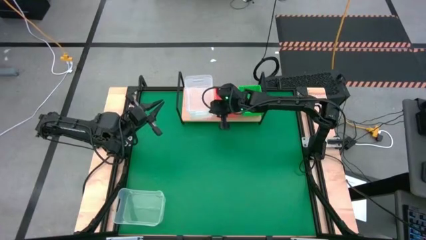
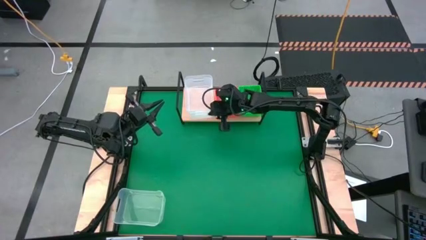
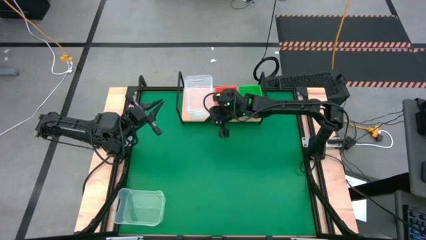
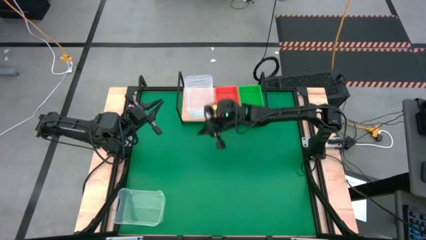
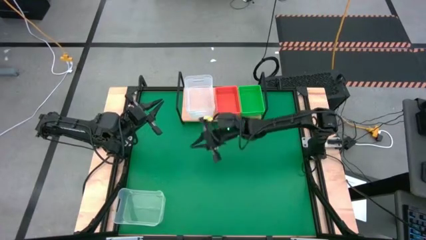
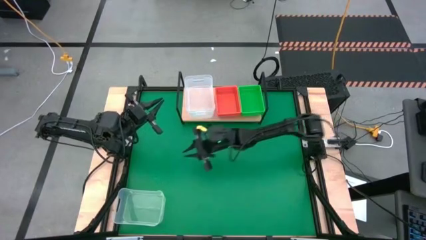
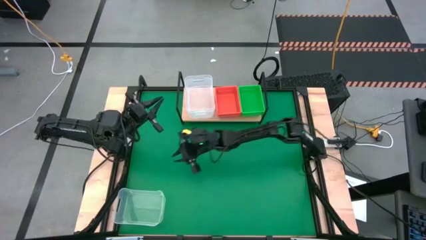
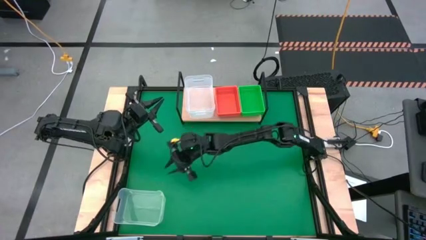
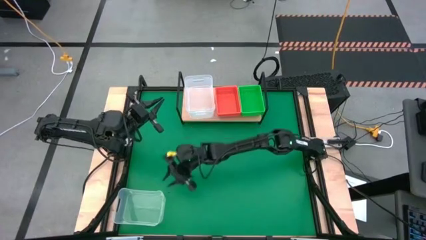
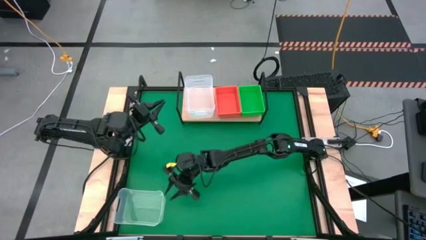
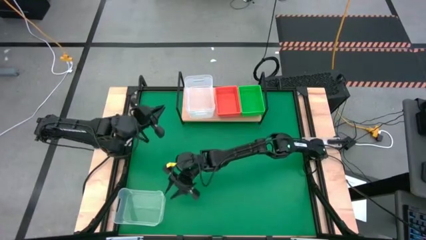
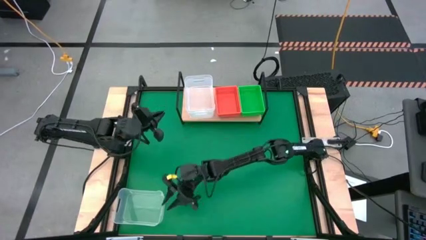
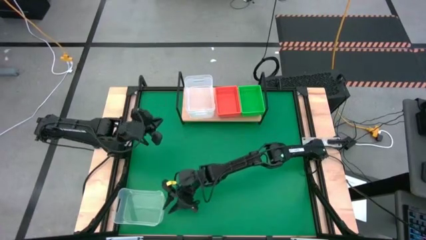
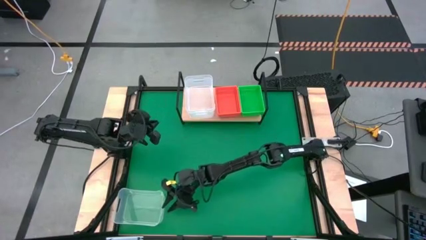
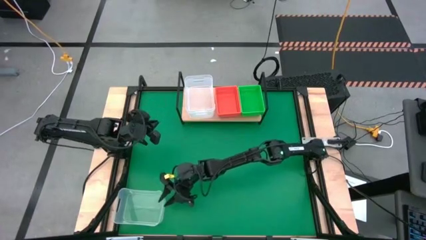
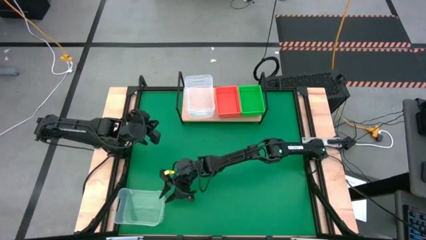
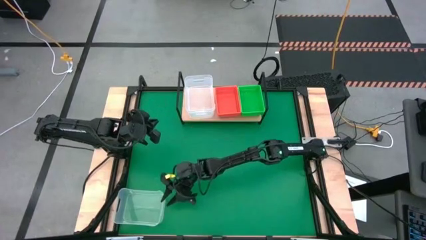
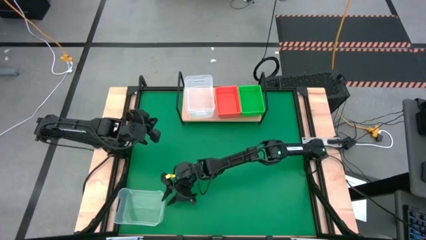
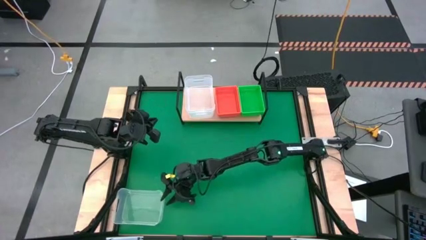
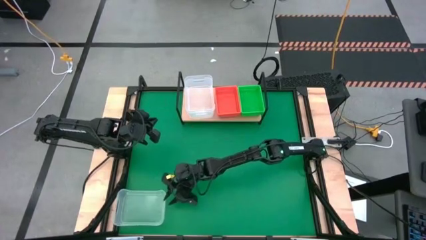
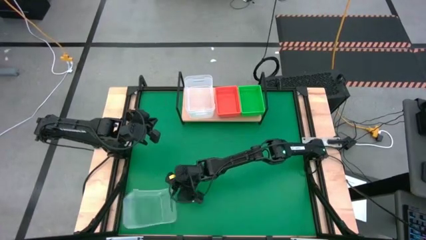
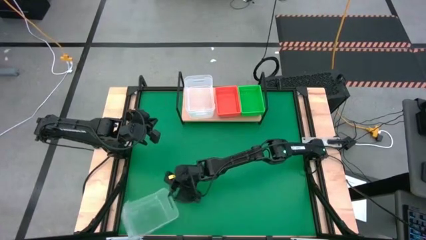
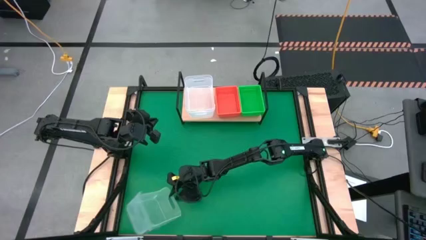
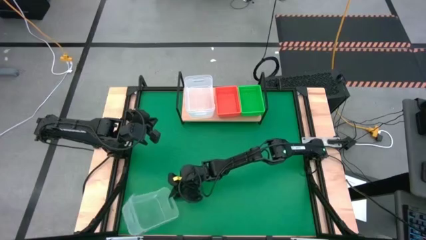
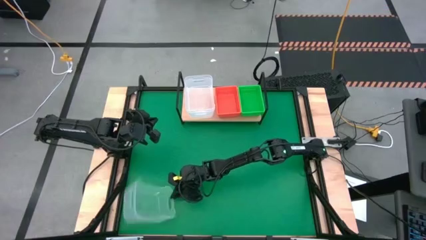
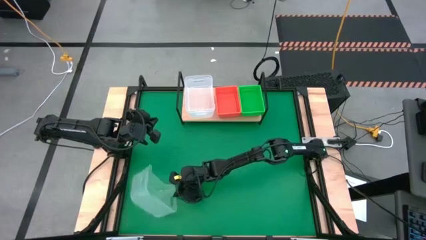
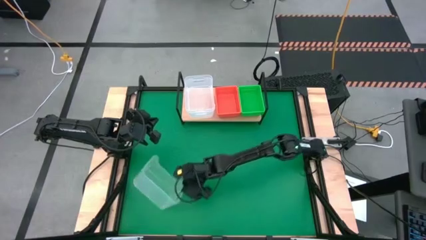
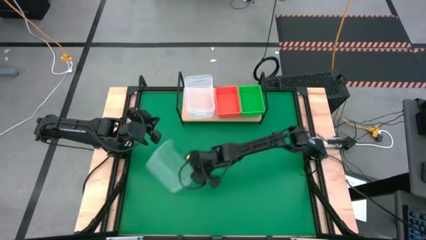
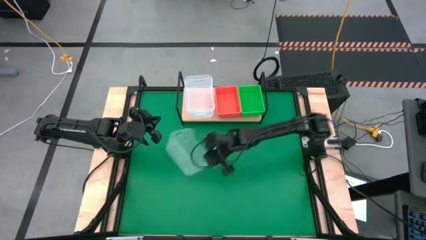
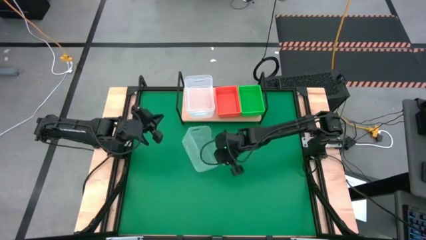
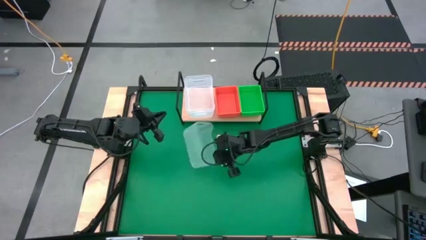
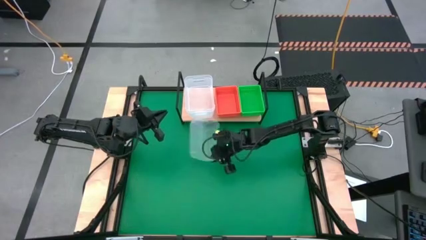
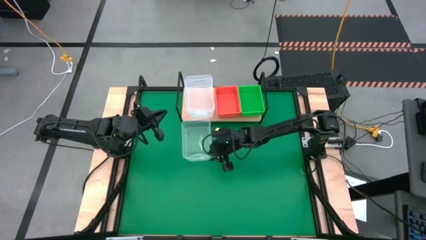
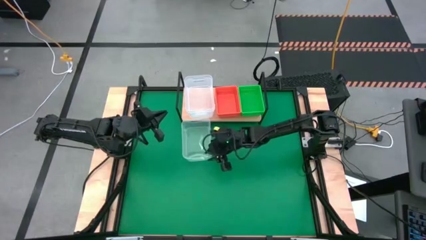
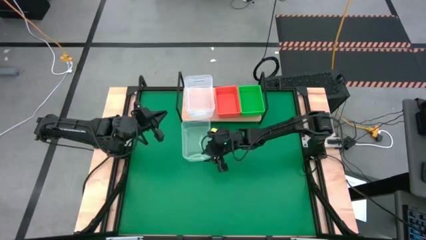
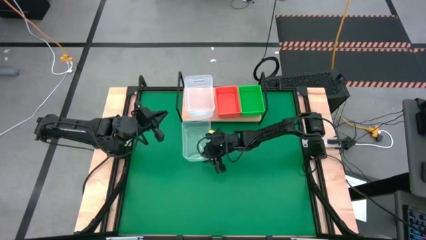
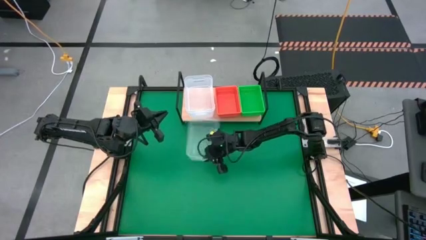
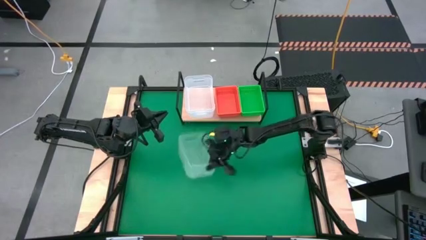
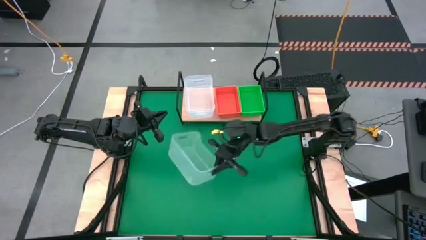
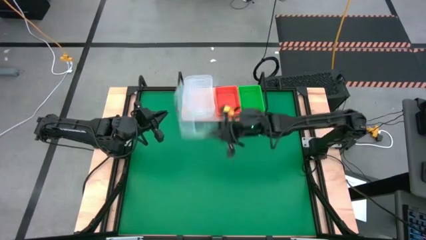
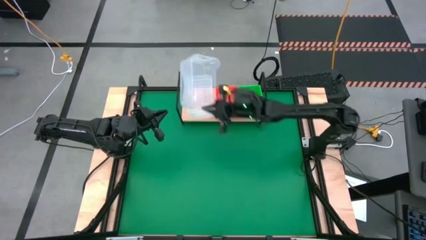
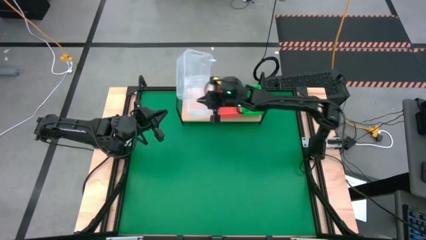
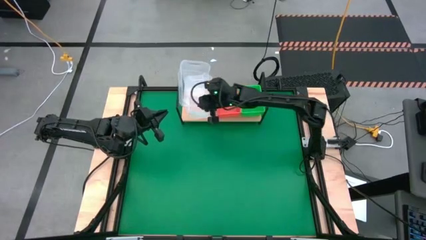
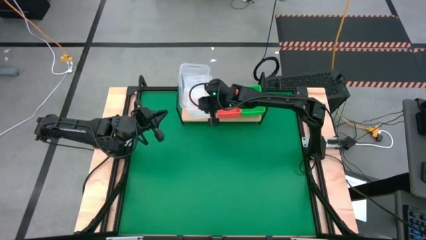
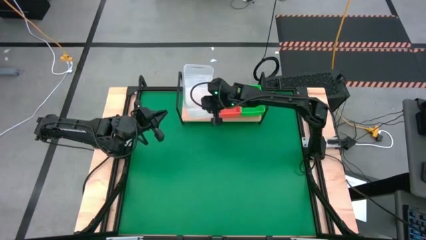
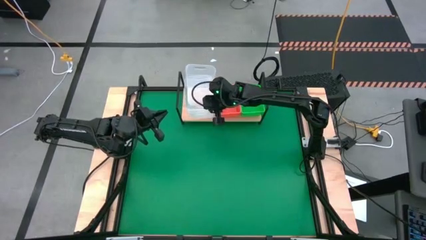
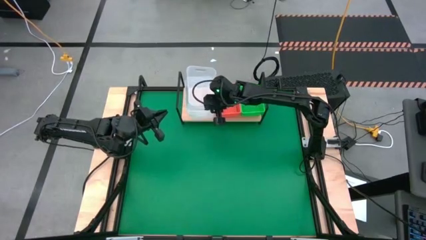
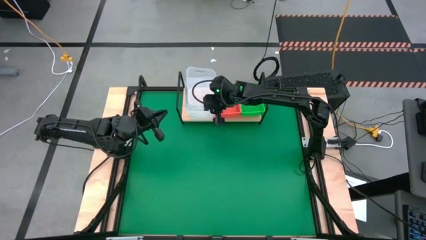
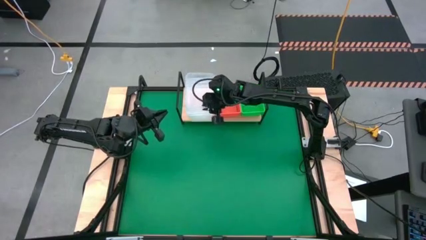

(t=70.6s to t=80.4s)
Task: Stack baskets on shelf by color
Stack the transparent bin on the transparent bins on the shelf

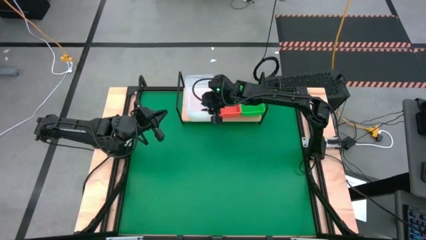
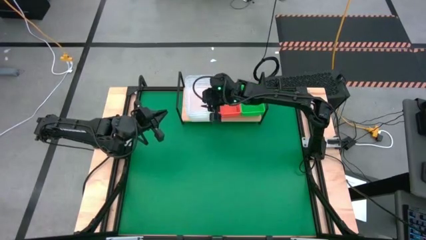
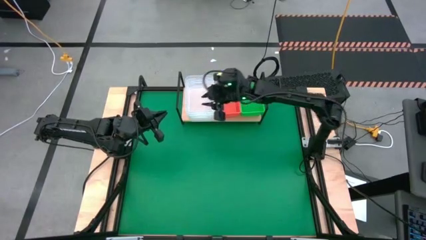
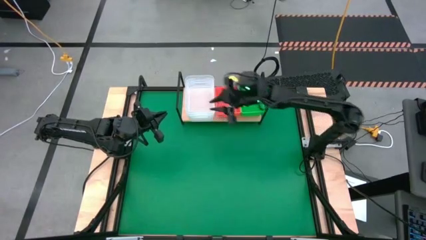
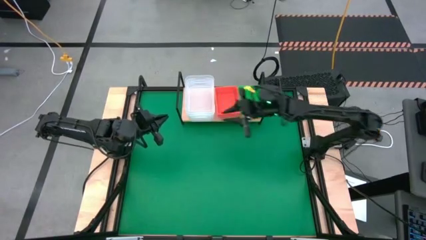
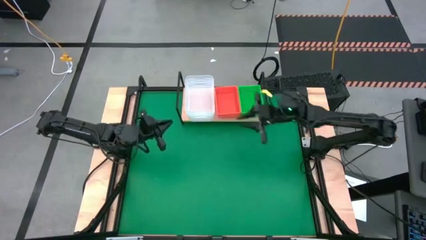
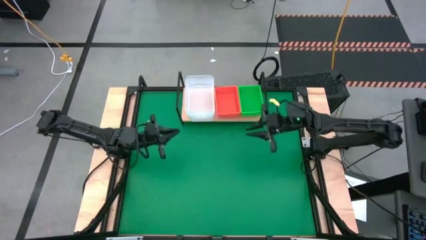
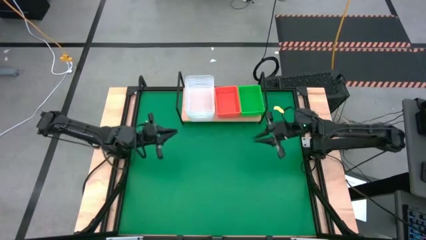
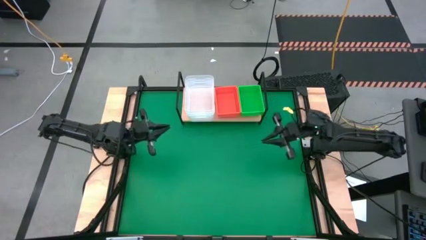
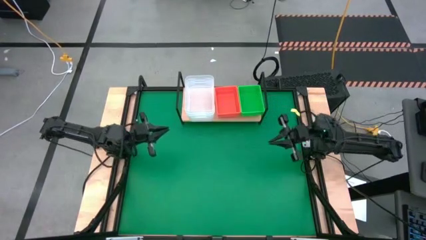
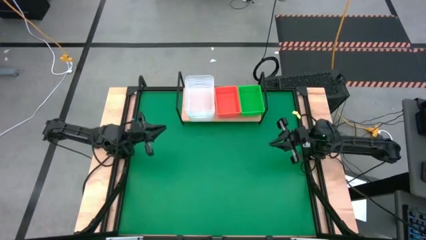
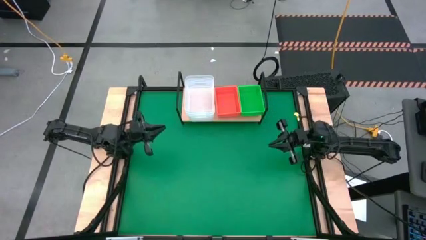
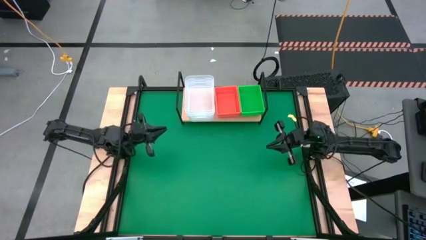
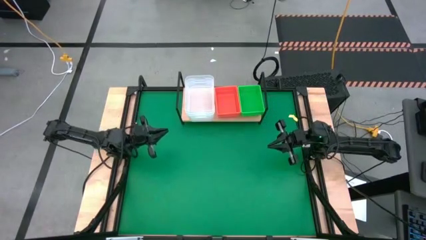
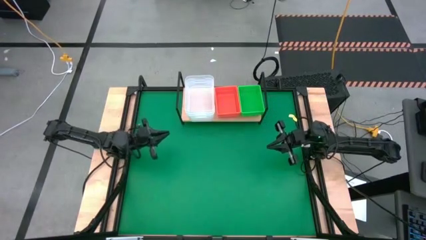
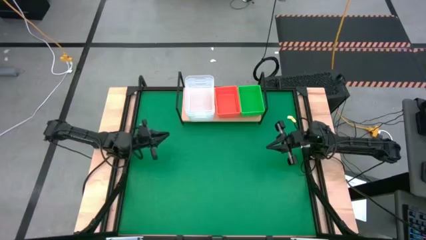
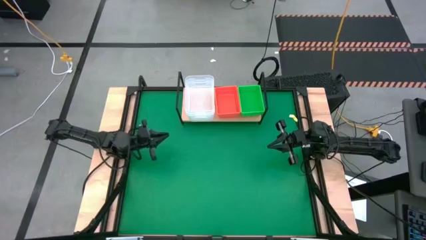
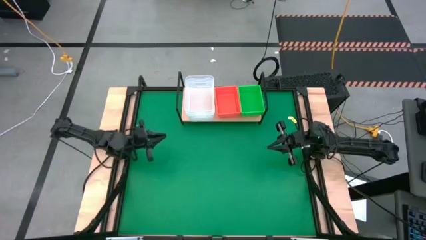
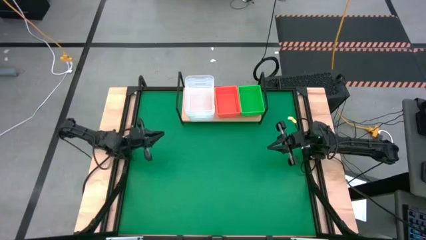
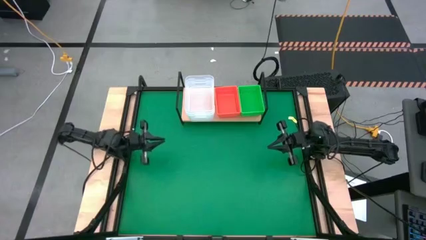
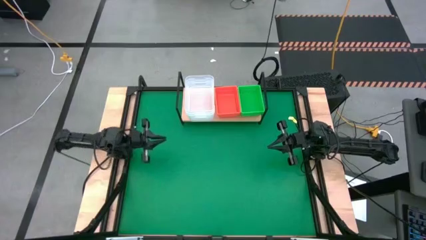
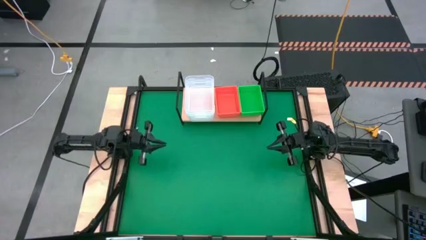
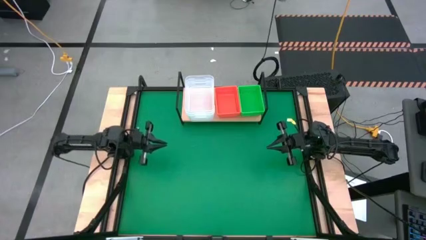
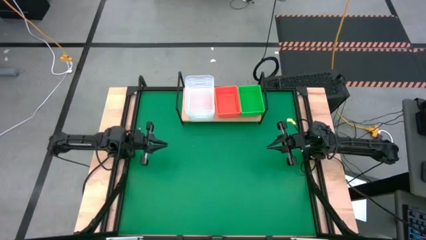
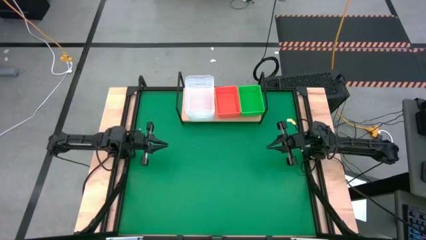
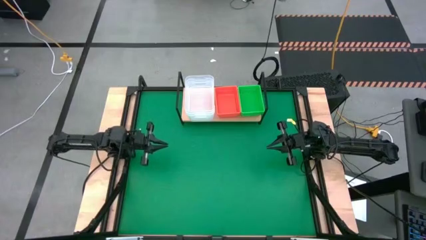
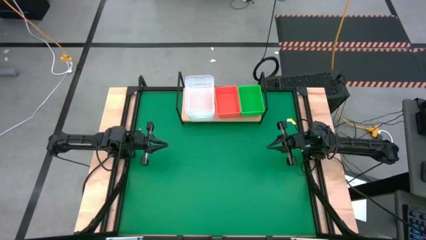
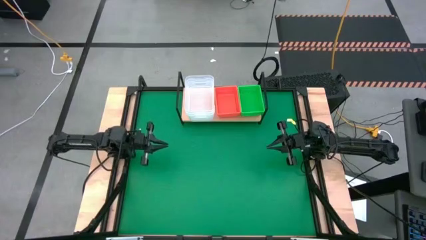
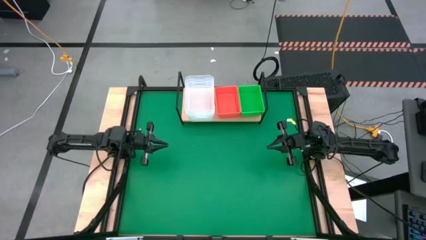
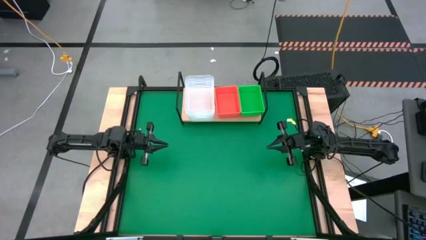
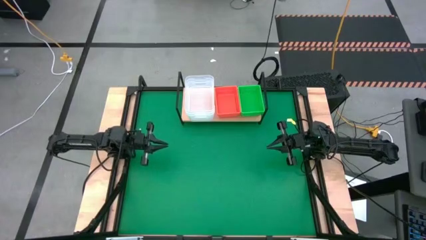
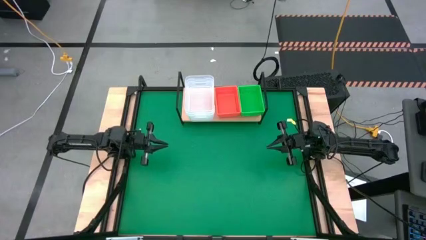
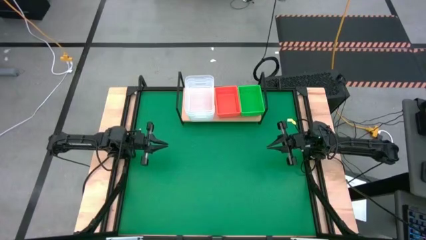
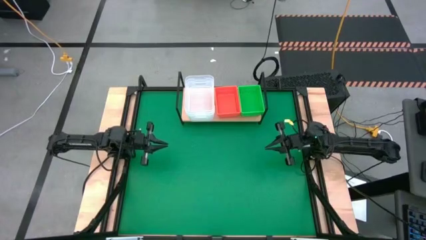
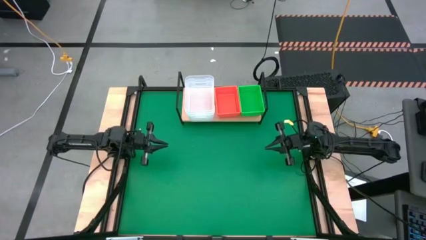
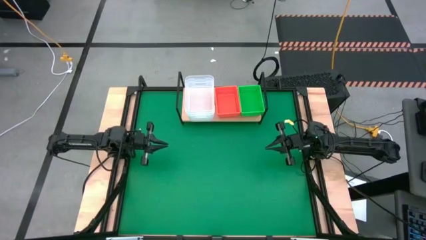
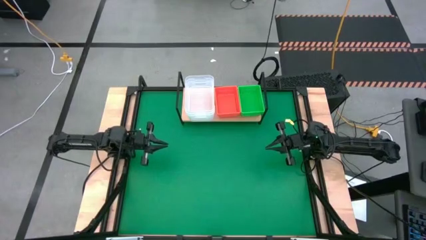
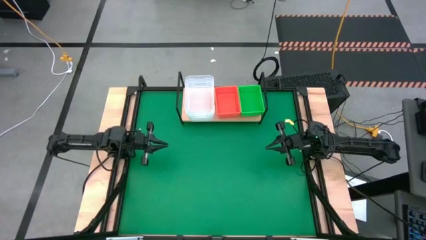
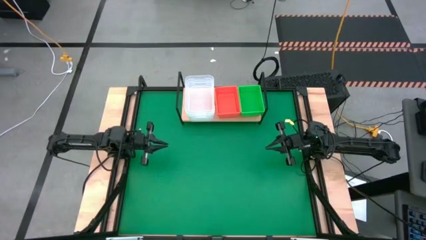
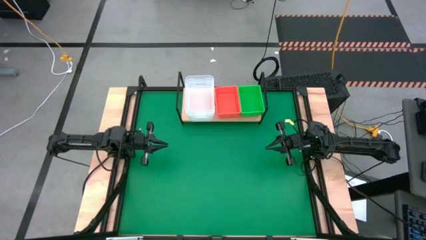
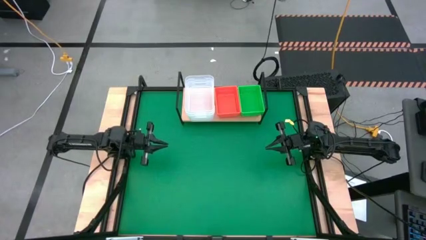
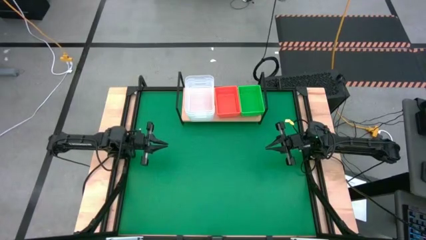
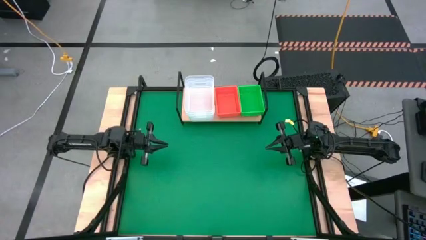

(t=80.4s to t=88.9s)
Return to Home Position
